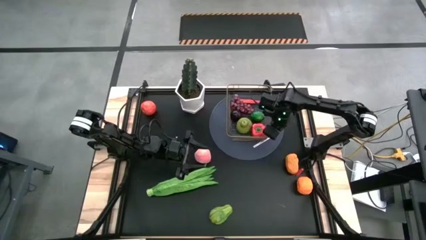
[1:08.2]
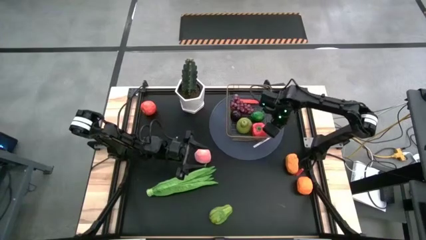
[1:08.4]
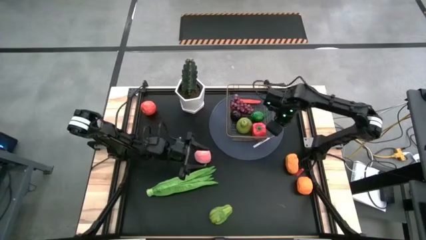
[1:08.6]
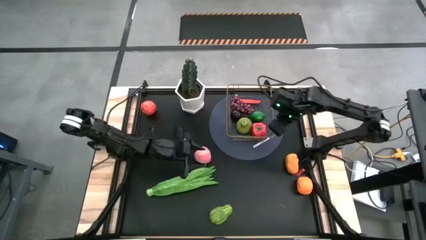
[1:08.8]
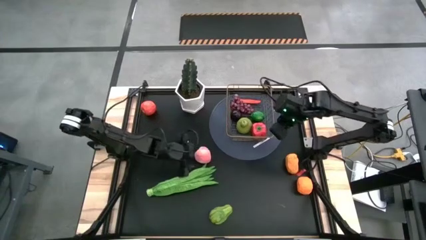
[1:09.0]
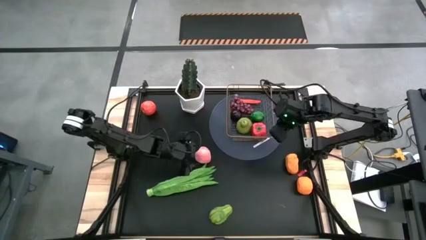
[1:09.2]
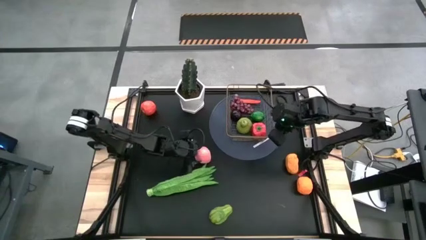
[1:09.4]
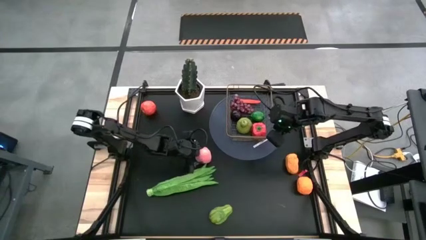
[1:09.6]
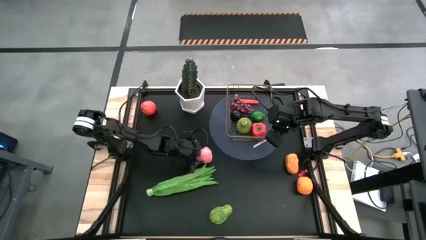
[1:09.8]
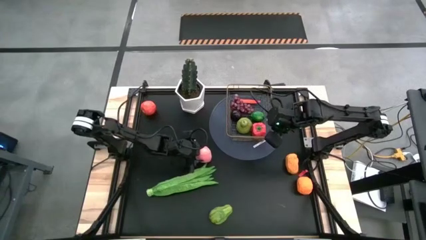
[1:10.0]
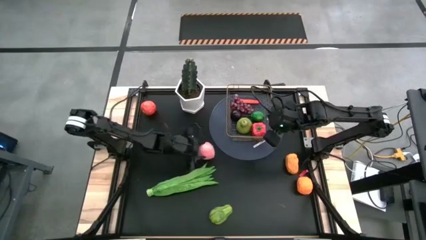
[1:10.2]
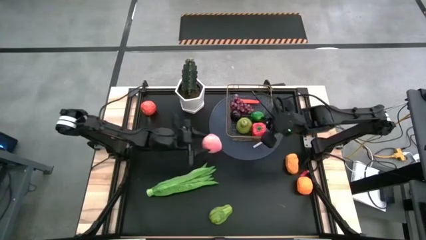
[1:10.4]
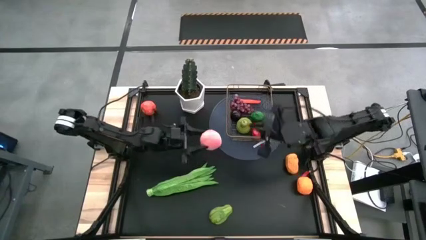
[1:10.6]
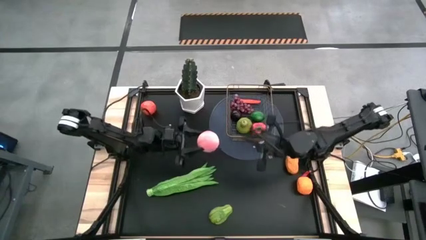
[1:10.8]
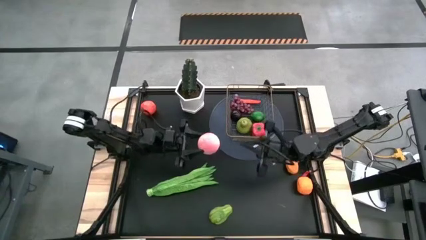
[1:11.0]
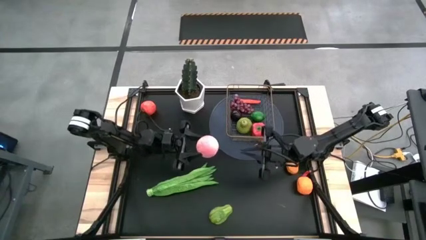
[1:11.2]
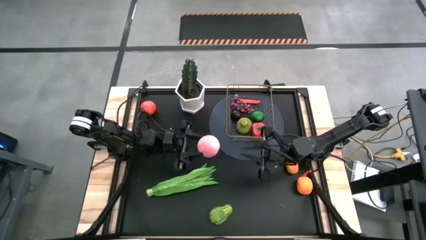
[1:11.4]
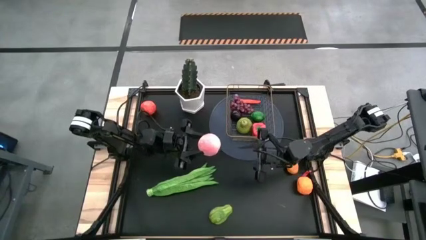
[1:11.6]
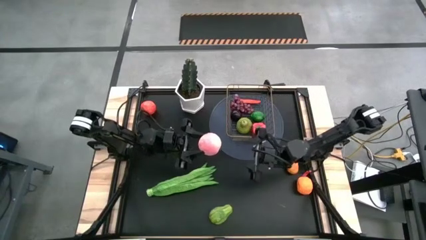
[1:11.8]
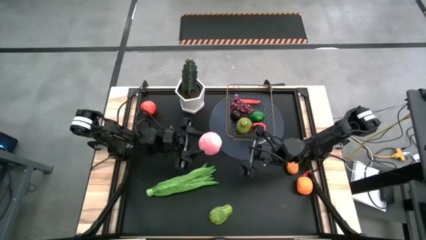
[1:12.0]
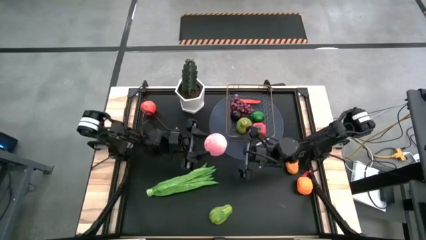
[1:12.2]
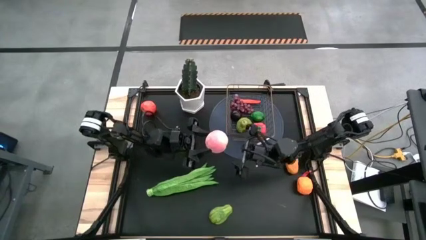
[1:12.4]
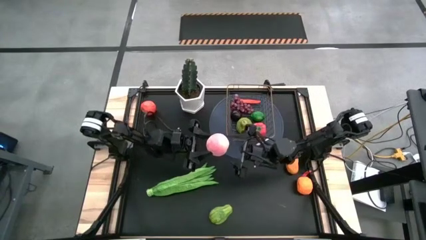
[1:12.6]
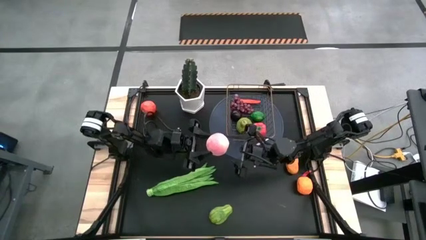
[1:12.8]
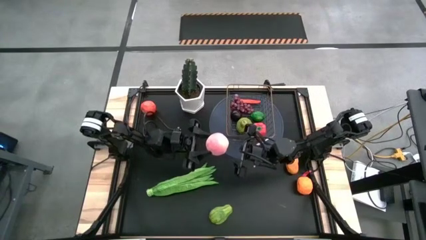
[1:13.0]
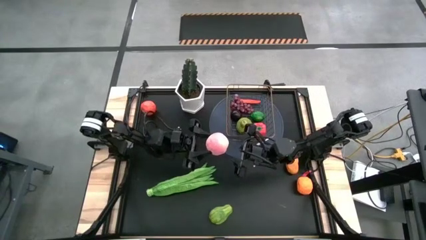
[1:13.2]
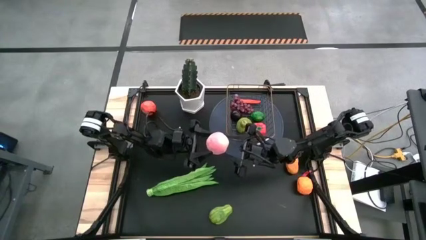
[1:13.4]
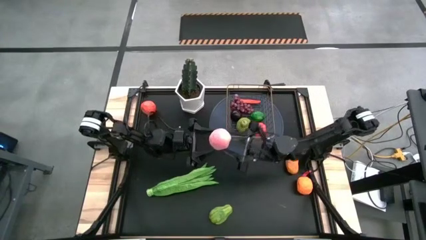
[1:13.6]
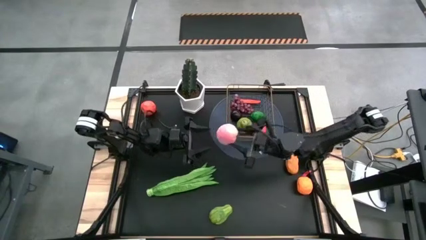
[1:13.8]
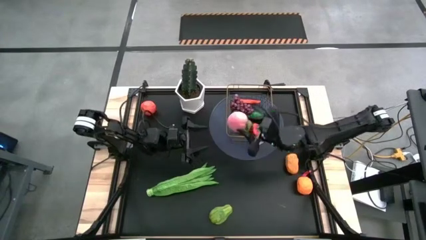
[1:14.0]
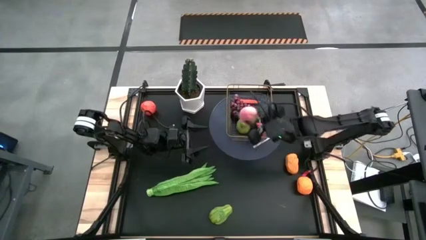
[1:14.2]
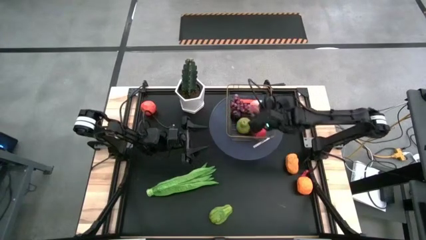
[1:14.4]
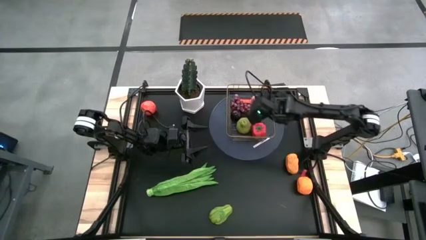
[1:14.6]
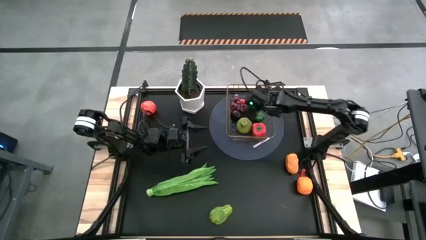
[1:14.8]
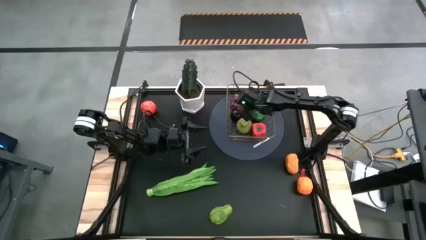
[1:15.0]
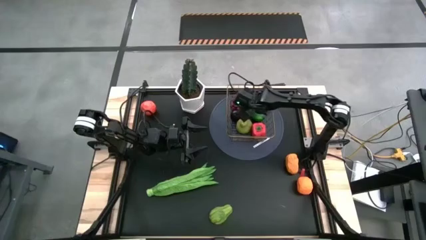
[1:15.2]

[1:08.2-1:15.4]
Task: Build produce basket
Put the pink peach into the gold wire basket

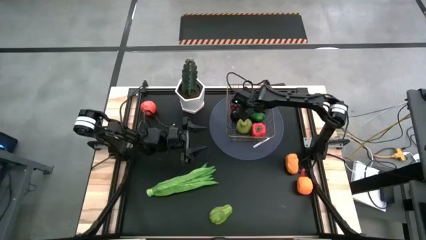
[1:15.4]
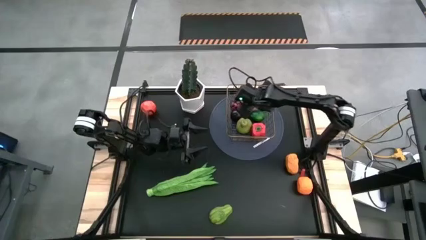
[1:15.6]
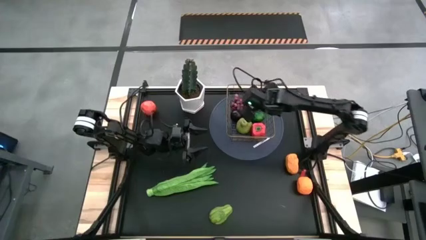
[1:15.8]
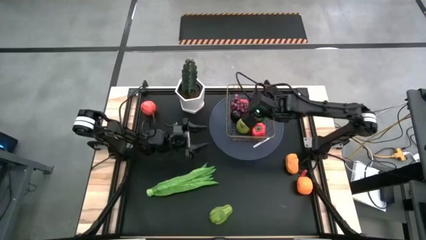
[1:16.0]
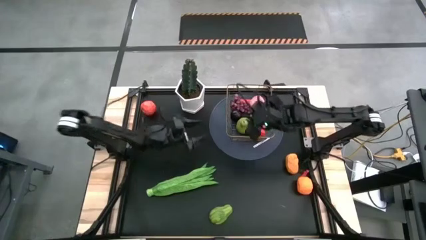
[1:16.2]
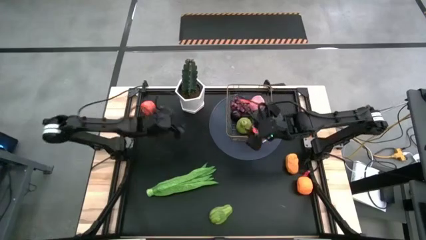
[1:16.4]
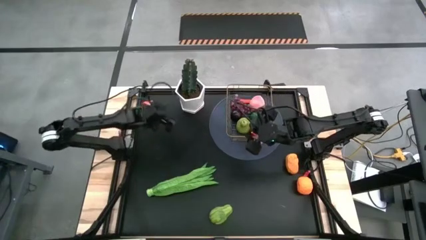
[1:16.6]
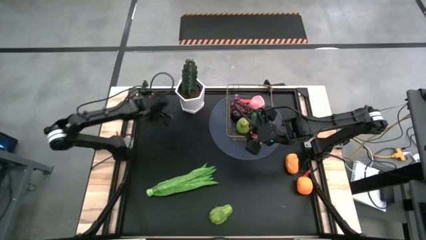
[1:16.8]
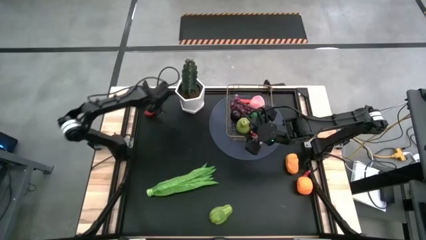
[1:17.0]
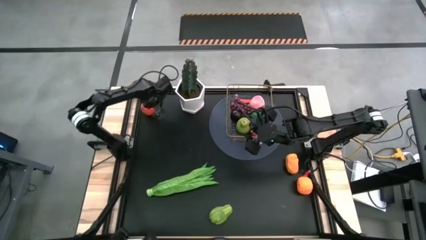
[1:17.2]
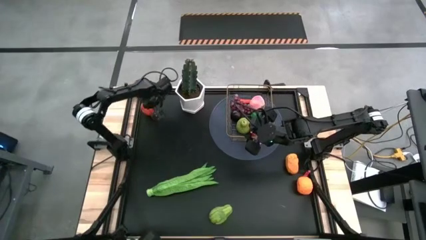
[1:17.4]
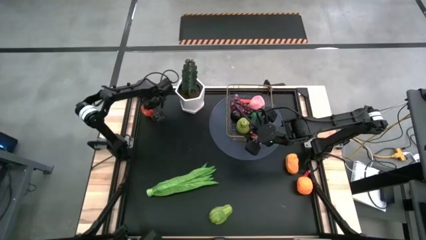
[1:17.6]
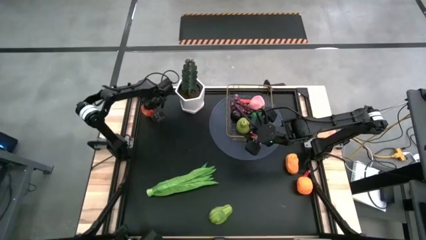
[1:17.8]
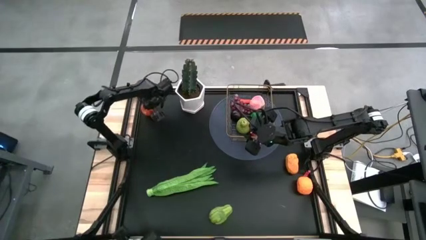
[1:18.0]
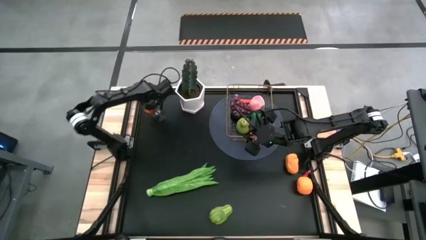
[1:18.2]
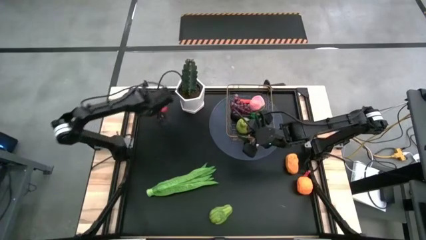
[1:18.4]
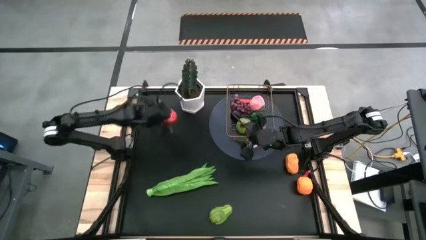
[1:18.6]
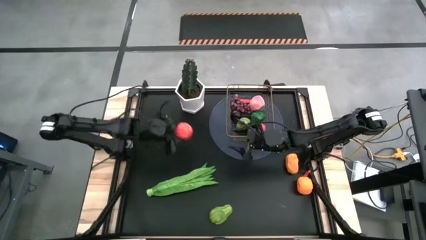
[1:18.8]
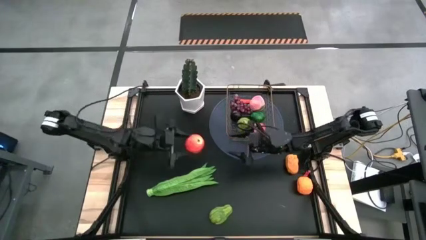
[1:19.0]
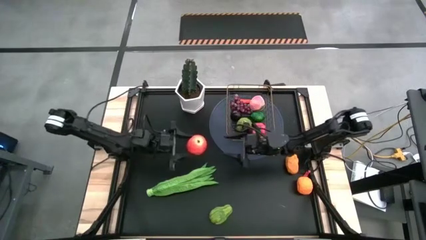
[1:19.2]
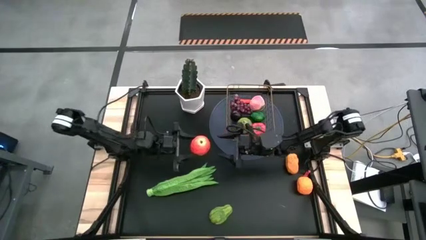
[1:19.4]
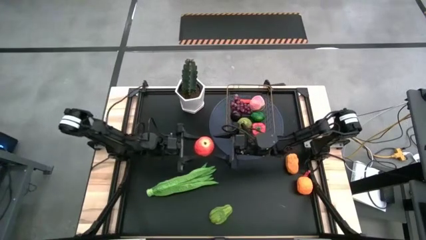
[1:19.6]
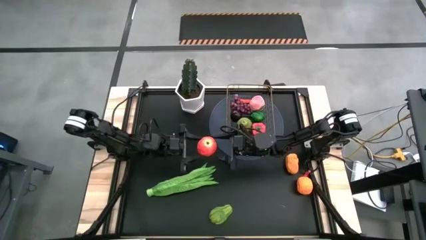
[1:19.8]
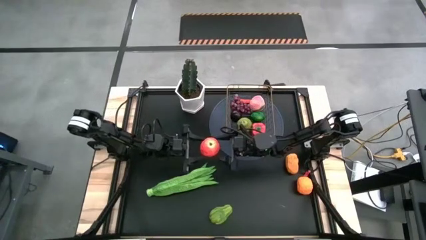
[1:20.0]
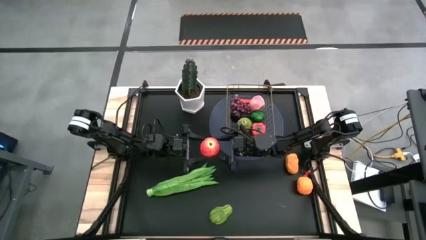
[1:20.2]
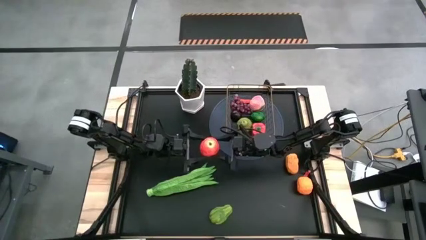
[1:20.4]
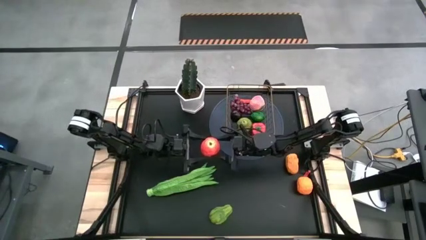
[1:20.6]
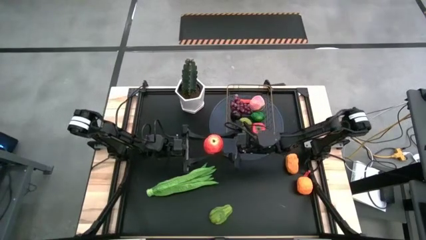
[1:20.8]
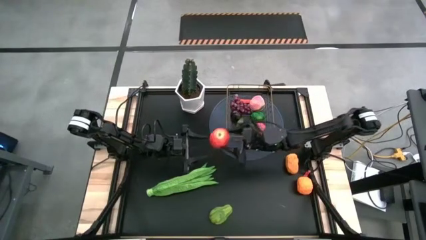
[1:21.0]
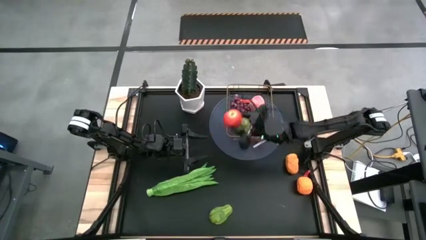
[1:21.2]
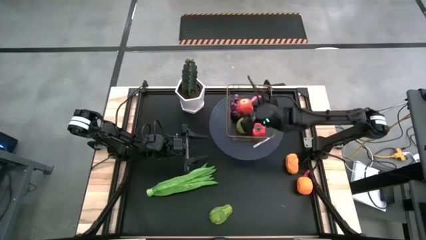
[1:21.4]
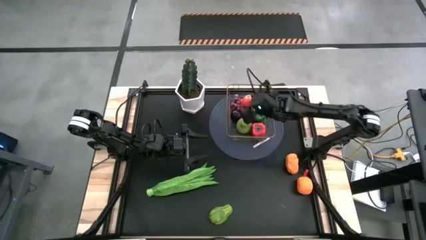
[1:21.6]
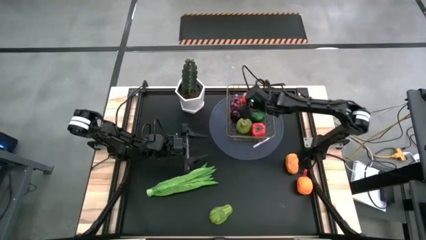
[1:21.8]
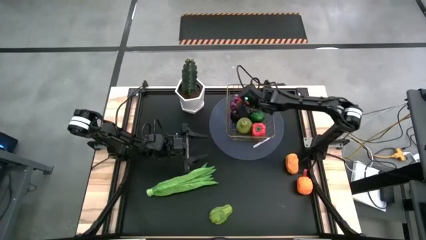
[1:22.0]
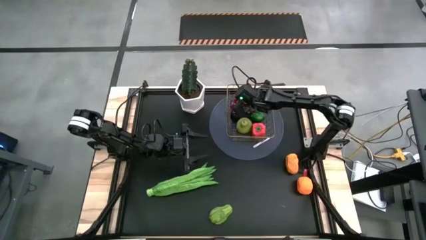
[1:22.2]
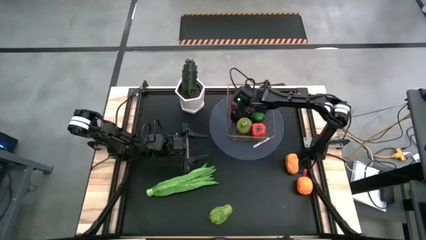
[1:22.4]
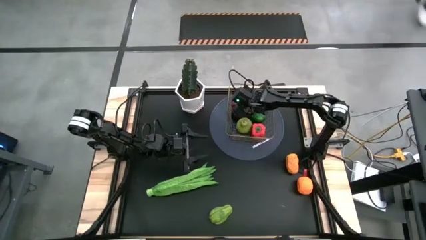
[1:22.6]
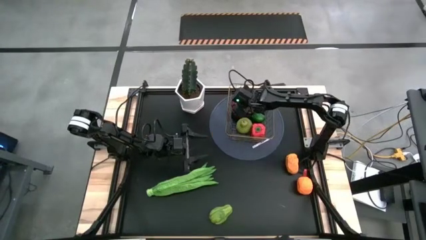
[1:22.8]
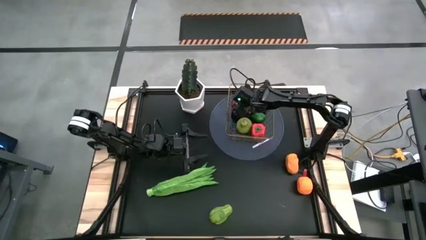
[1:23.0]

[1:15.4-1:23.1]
Put the red apple into the gold wire basket

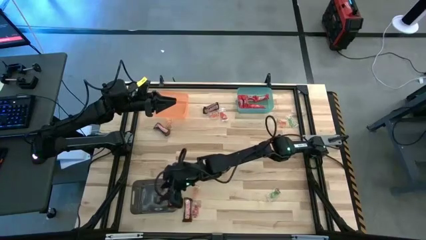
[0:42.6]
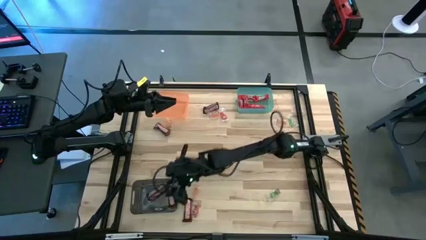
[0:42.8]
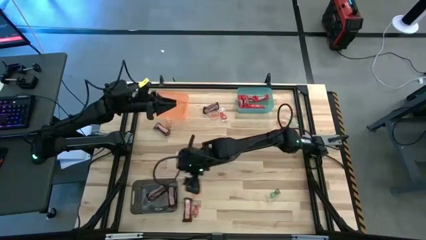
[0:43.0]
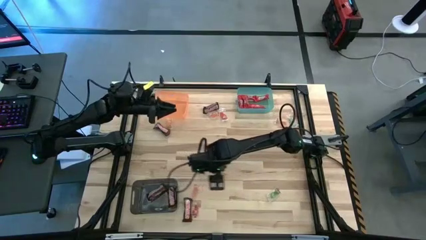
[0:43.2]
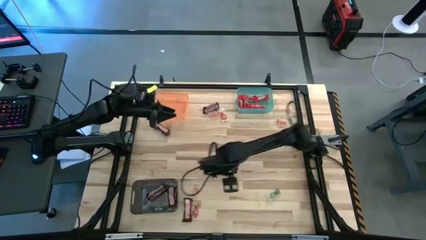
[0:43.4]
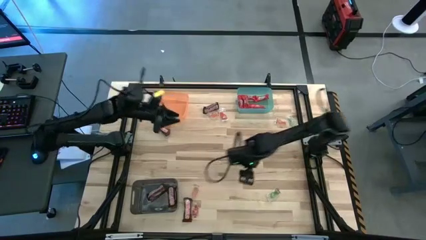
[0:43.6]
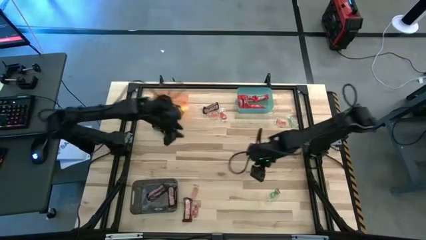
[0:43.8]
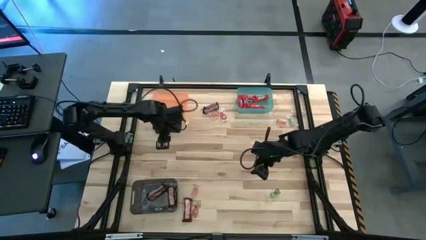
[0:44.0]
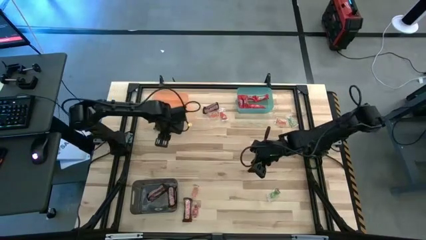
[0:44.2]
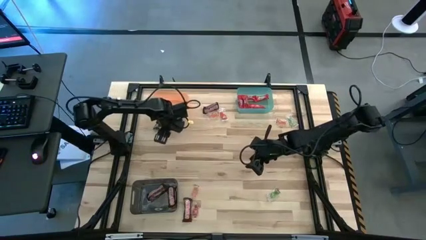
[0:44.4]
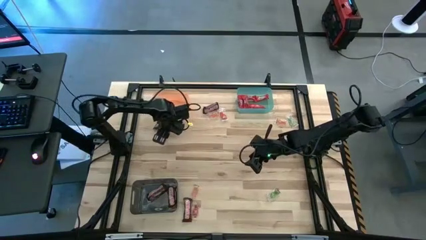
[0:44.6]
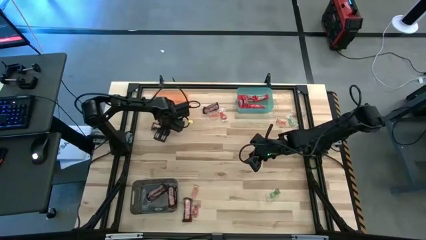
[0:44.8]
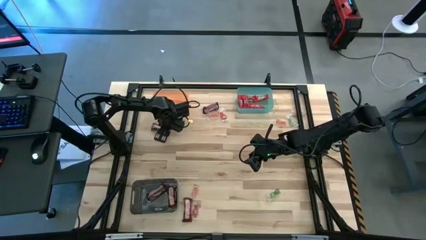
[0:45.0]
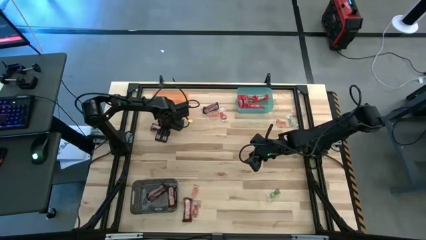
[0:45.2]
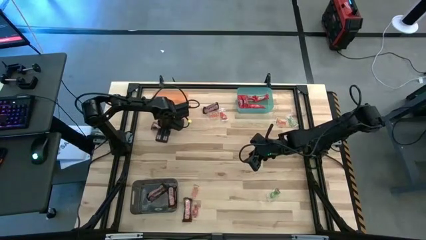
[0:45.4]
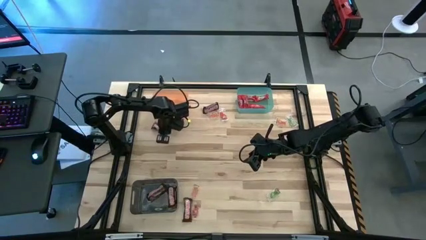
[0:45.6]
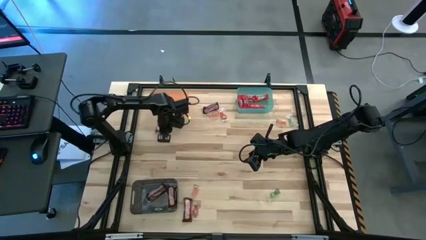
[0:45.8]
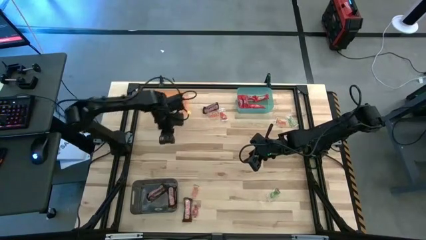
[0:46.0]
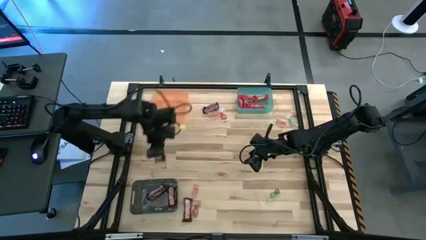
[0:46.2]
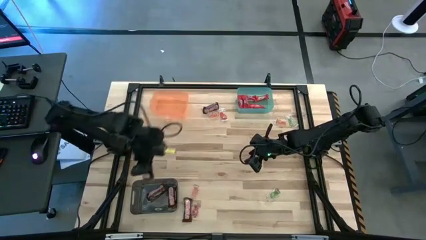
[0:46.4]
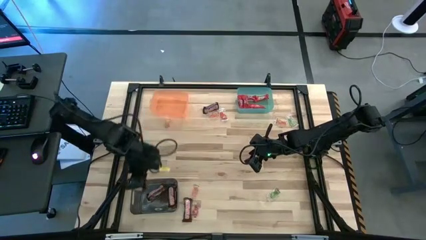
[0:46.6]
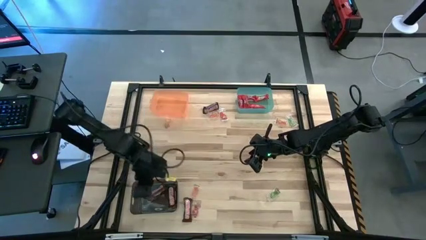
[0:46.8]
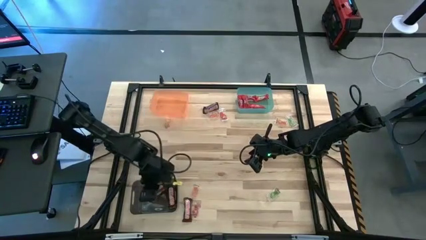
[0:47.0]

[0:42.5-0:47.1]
Task: Sort candy by brand, put in halloween buckets
Put the brown chocolate bar into the black bin
